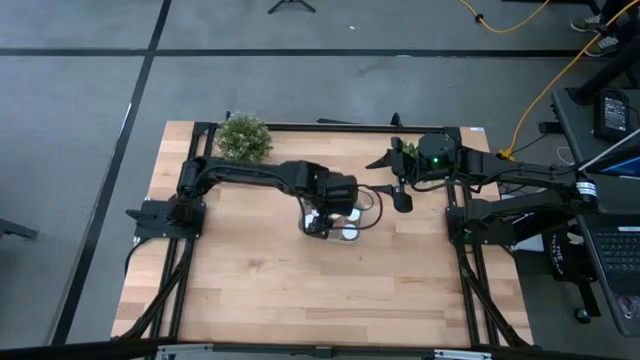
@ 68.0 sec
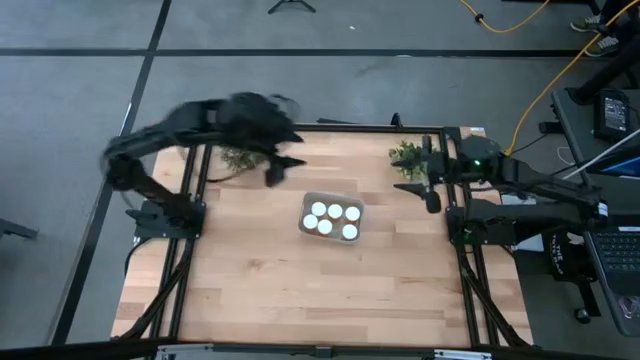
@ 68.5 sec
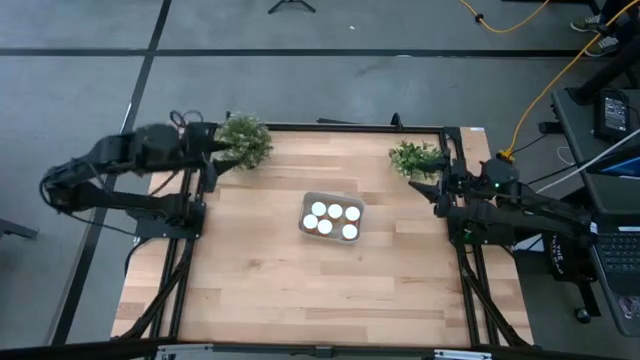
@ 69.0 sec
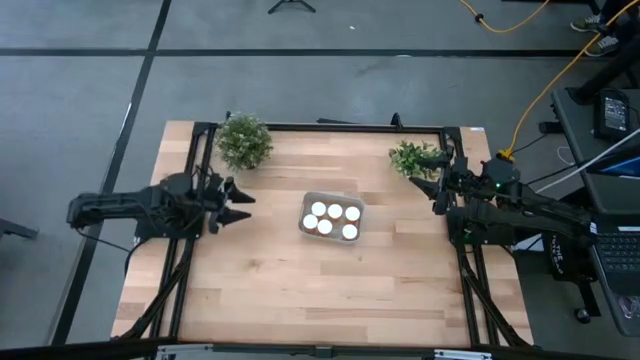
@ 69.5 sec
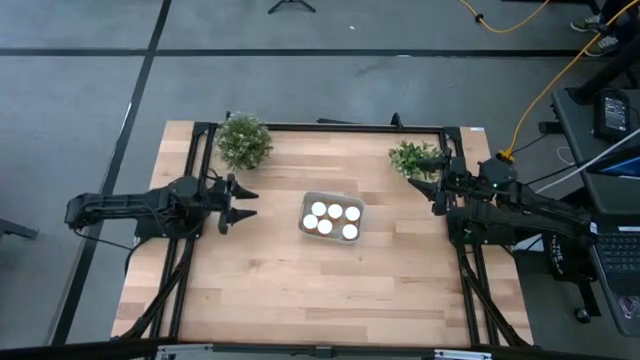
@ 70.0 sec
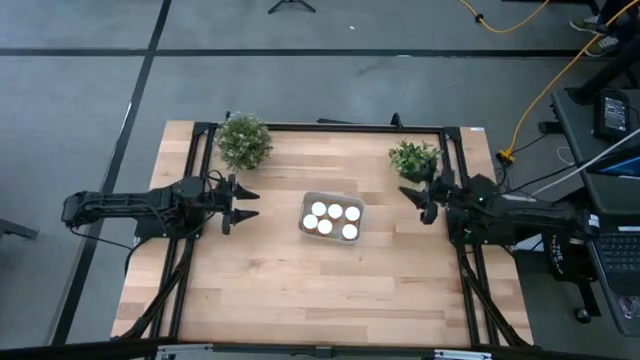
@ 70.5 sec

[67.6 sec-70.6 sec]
Task: Pick and place pill bottles into a basket
Return to Home Position

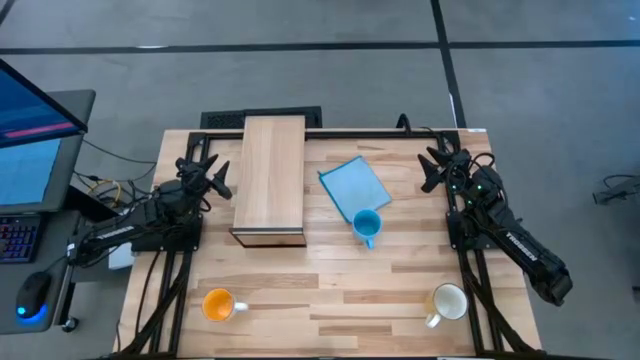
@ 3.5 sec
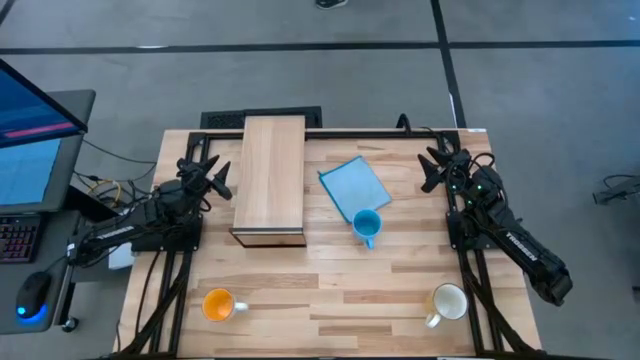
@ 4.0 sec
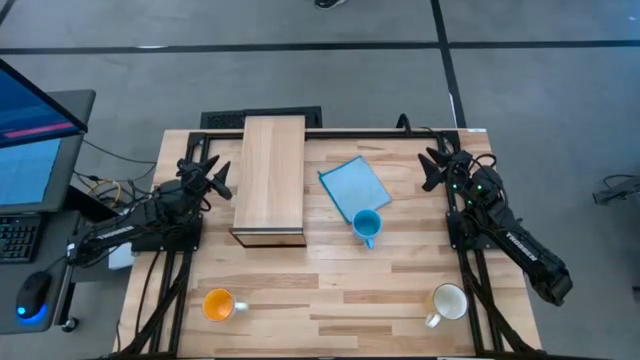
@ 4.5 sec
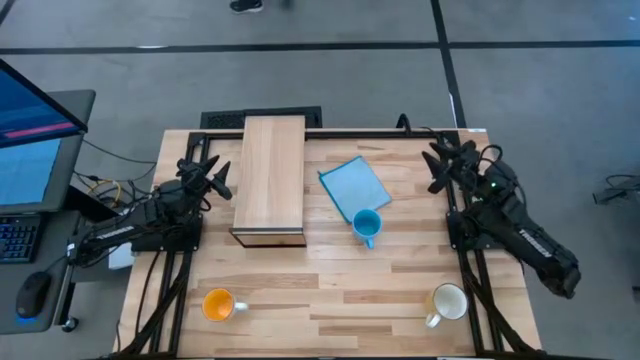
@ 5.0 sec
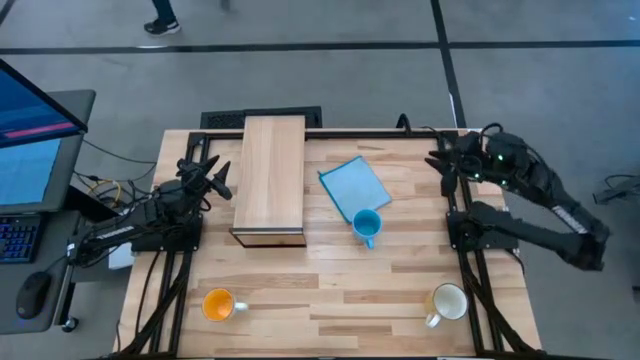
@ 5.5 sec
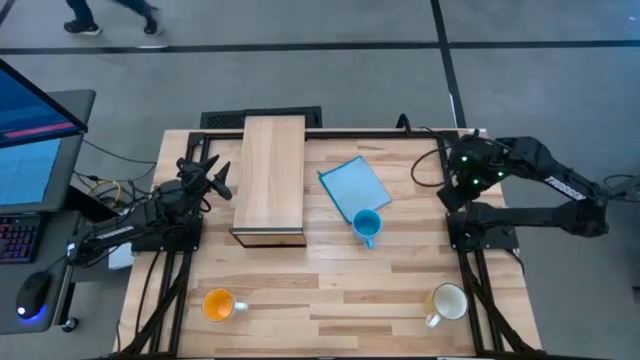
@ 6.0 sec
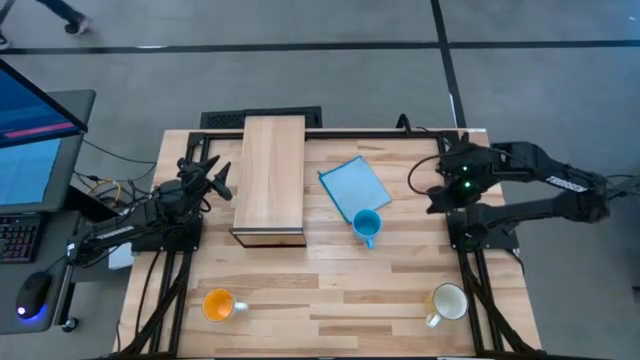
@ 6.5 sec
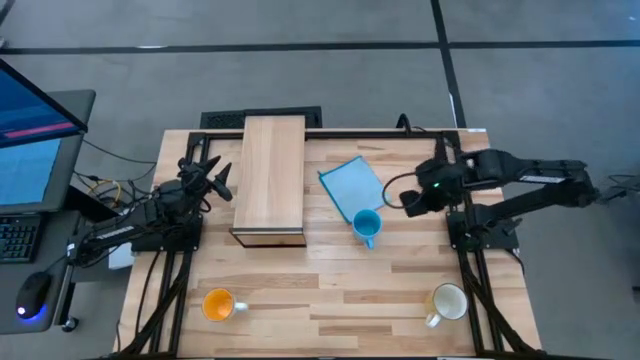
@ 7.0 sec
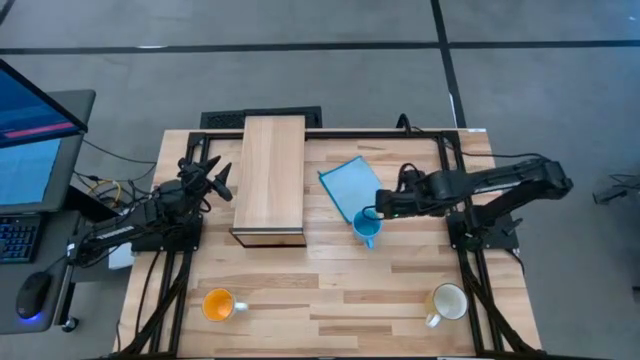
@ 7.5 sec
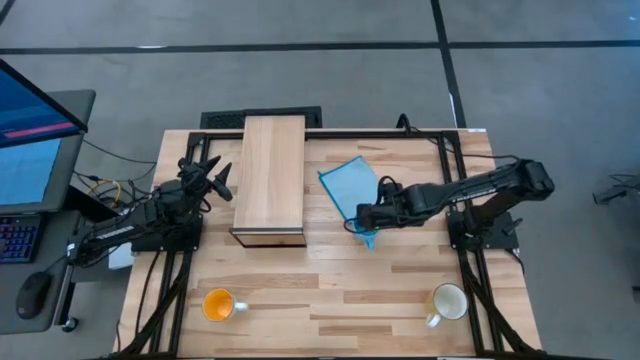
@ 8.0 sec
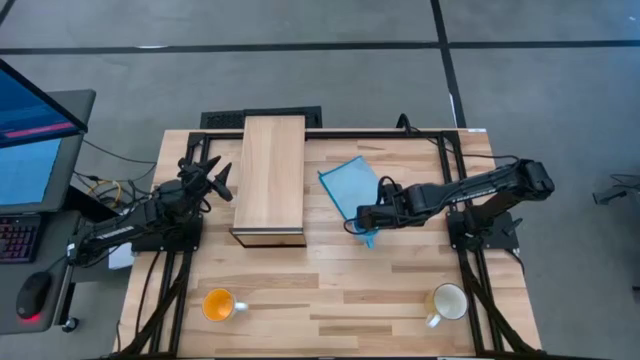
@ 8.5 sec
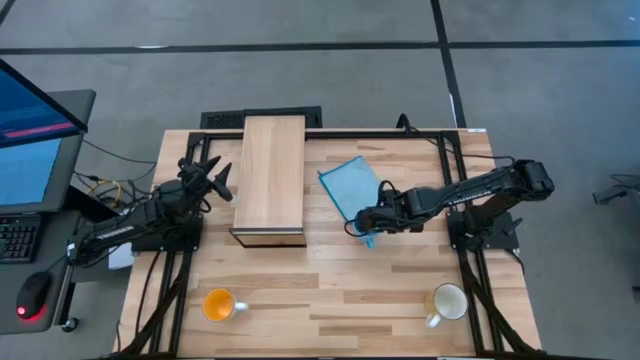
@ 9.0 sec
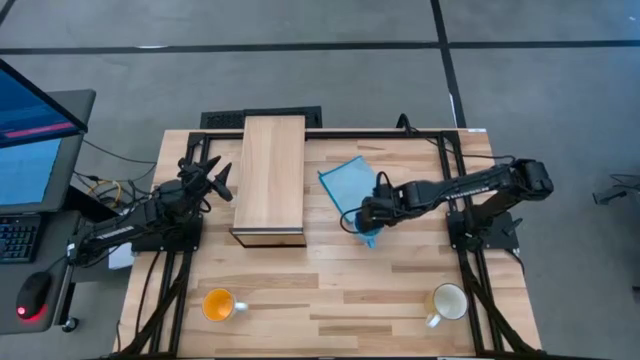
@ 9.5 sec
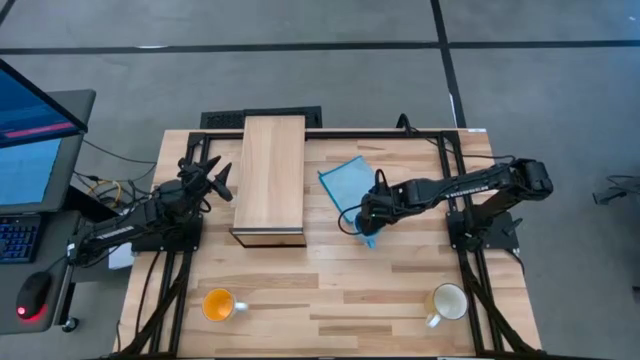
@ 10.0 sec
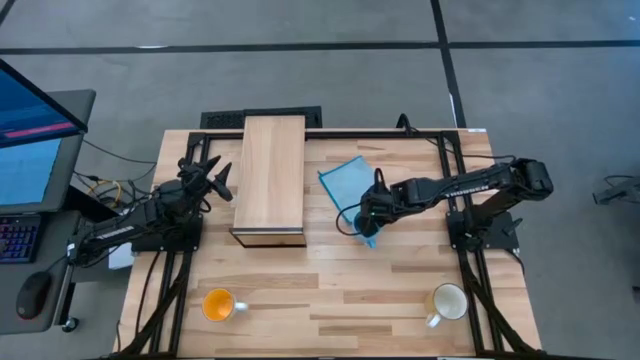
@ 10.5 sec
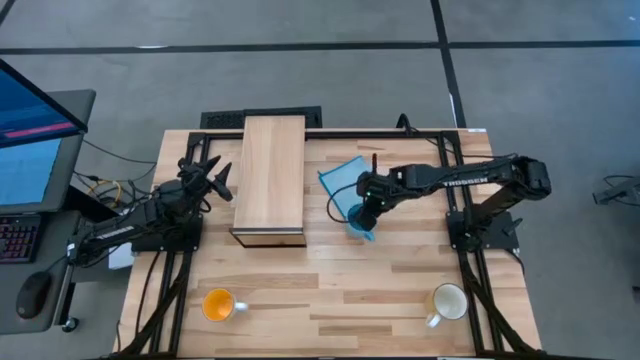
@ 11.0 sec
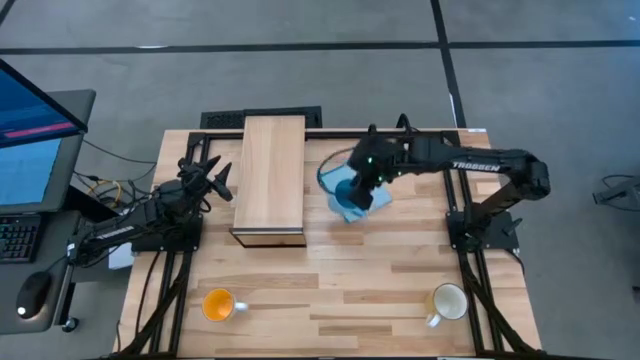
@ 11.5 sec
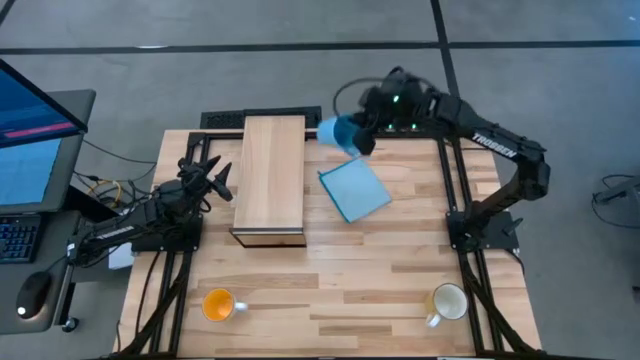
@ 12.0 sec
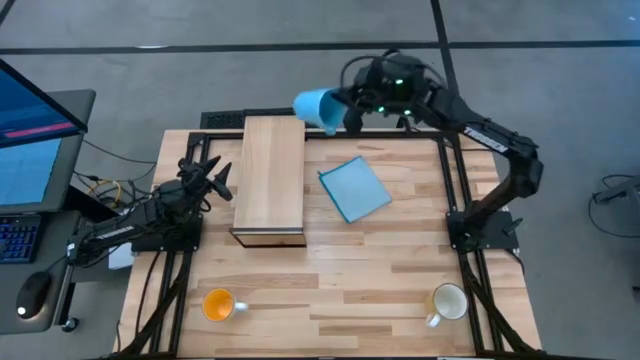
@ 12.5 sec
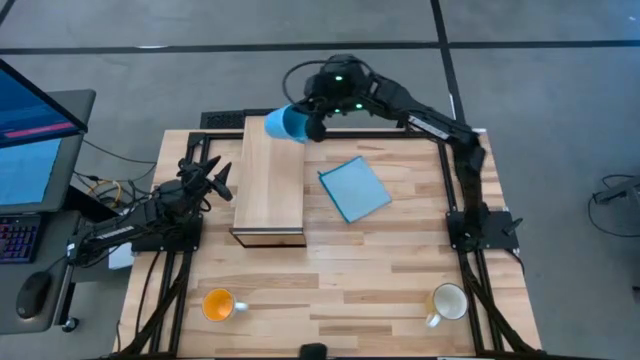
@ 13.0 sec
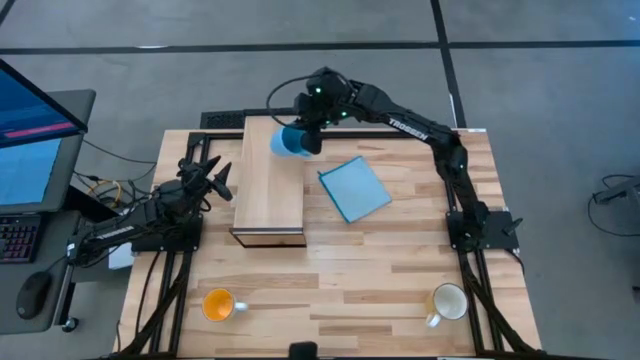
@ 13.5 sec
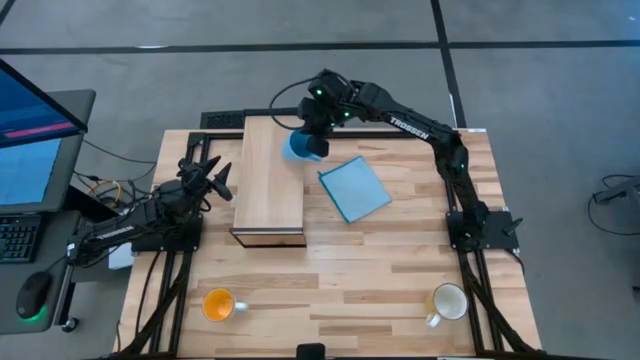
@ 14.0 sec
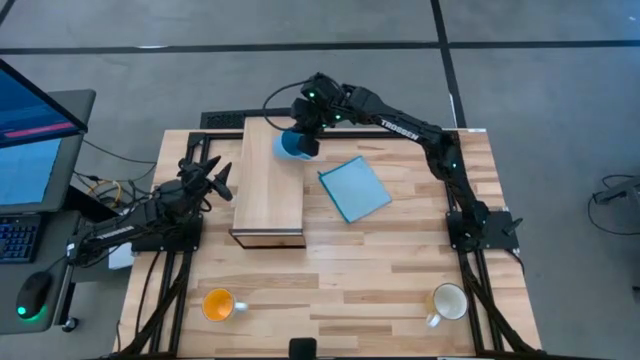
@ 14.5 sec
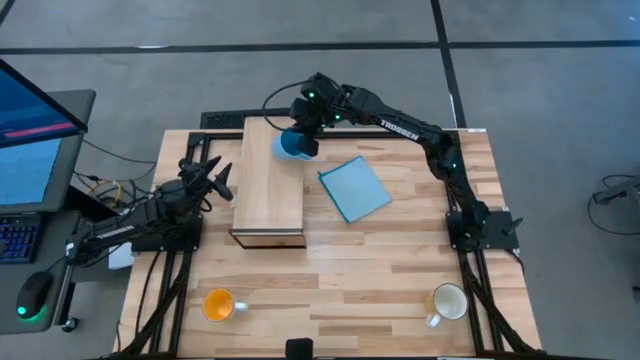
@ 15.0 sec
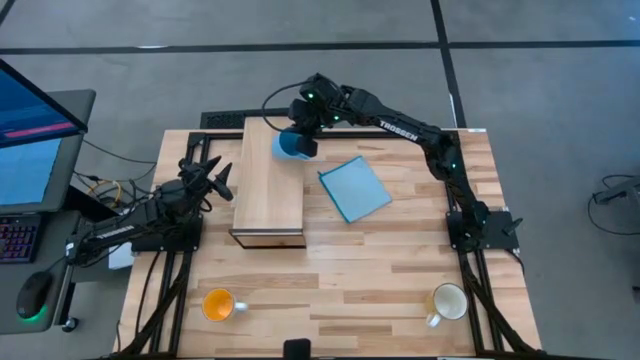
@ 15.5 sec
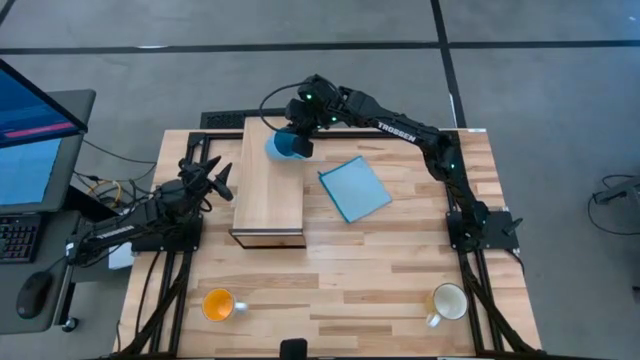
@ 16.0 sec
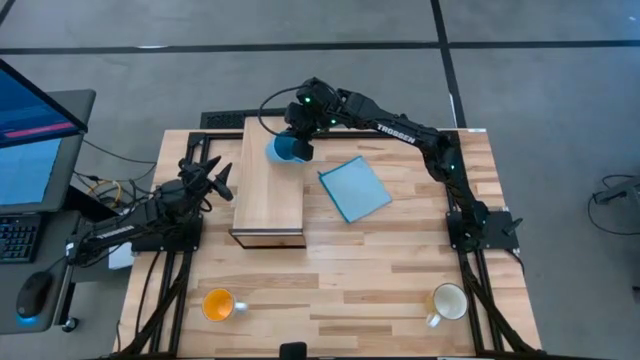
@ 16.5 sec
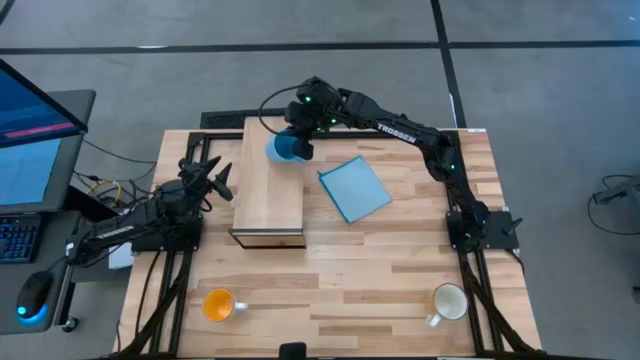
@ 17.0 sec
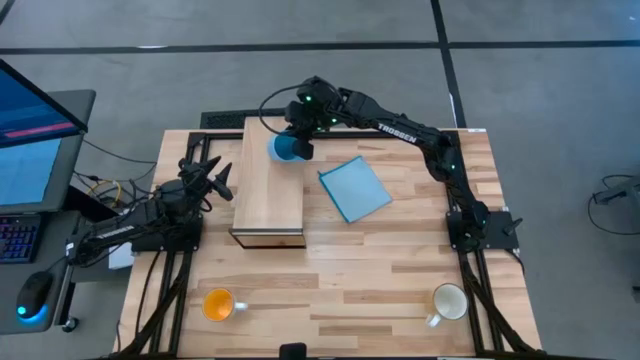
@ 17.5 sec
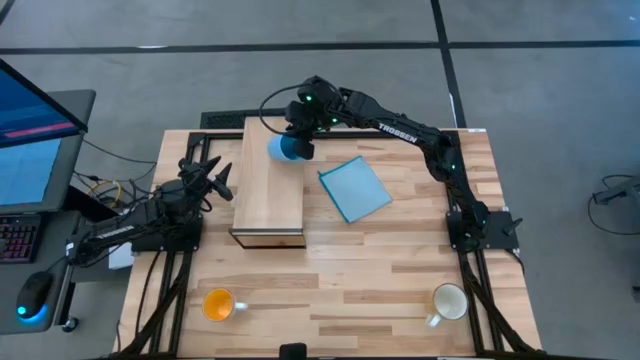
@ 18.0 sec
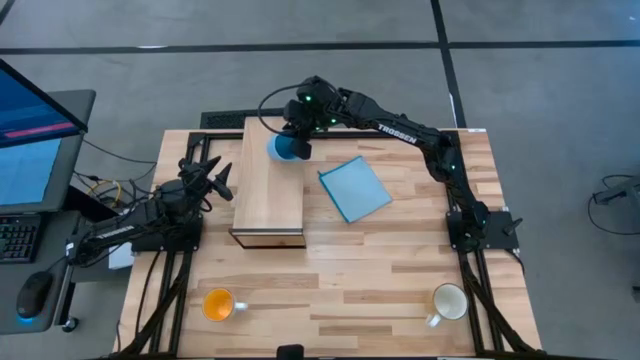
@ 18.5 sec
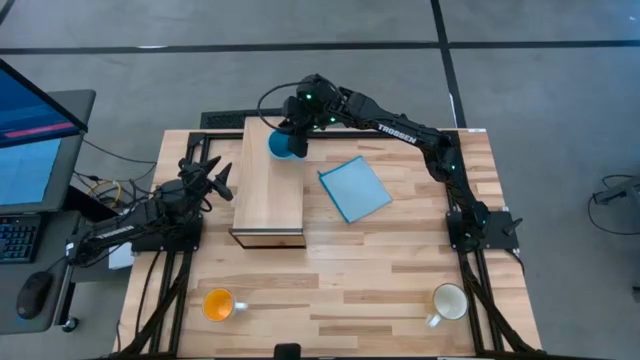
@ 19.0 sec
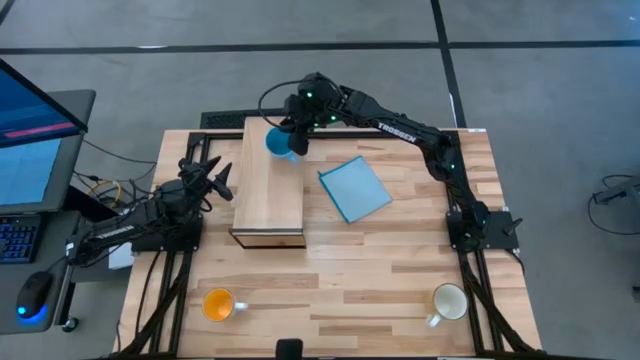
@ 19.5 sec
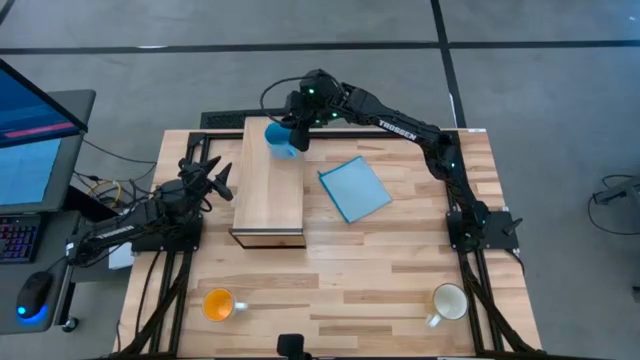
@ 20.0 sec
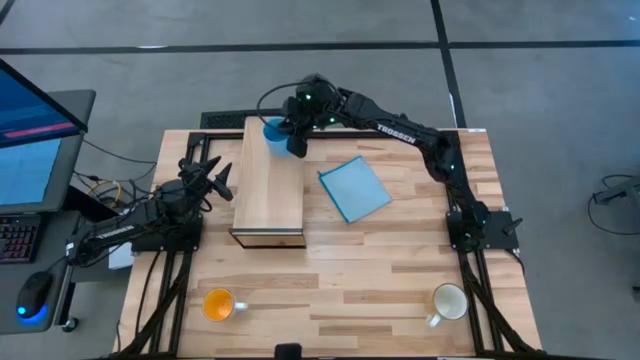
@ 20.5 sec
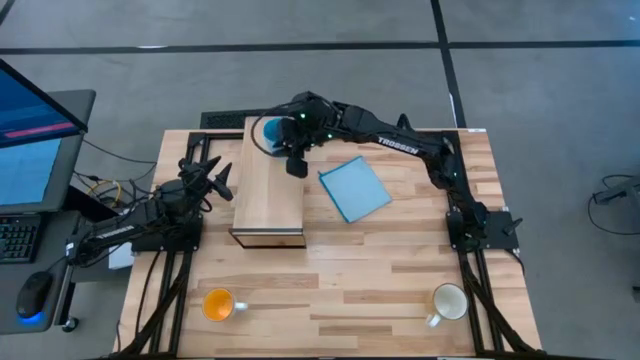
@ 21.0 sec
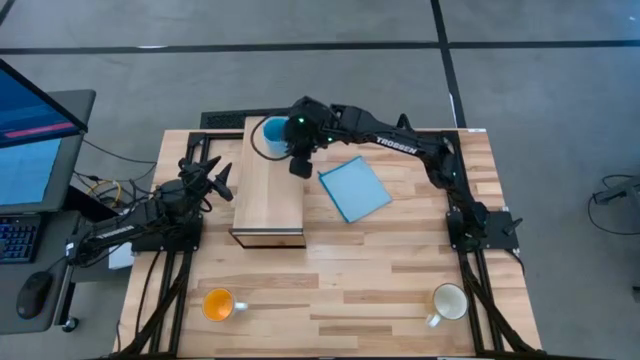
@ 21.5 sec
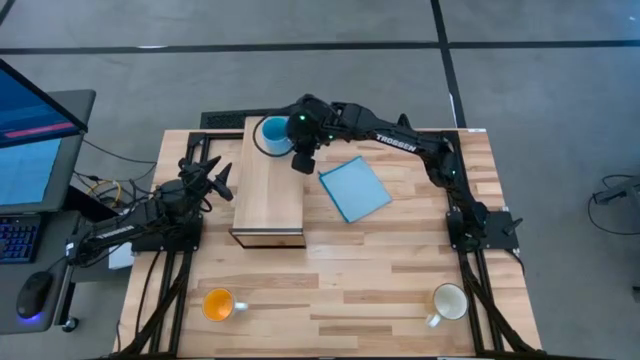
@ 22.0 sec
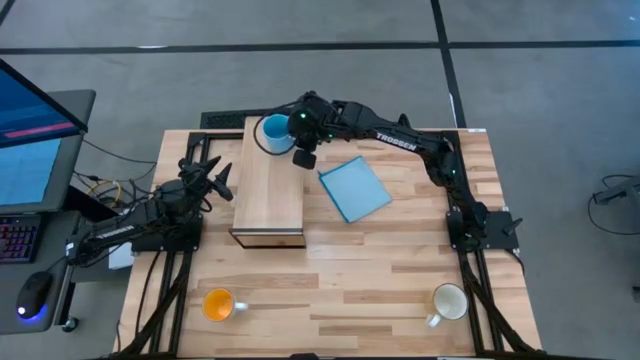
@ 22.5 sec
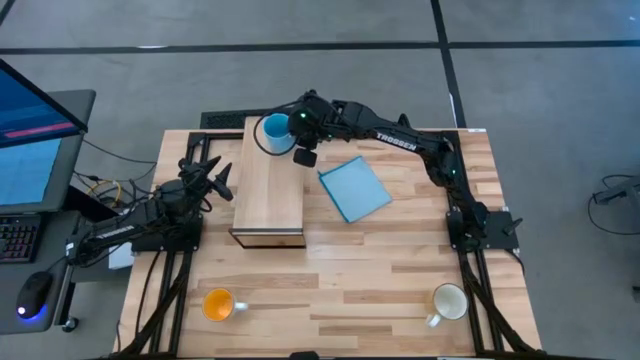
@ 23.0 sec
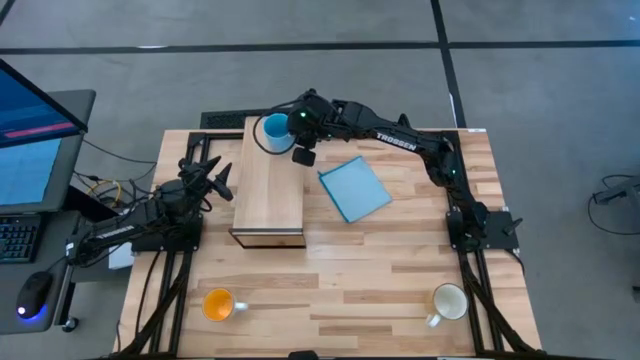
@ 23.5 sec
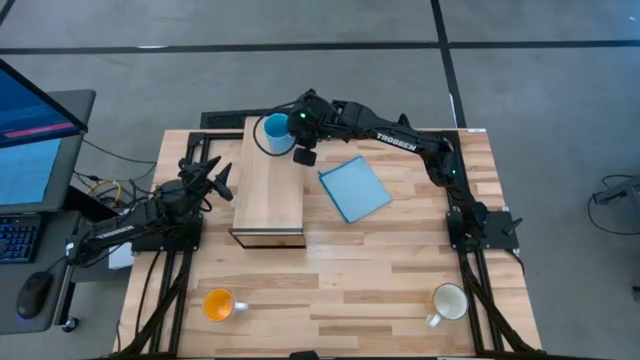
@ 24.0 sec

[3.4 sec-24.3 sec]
Task: Stack small to large cups/mugs on shelf
Put the blue mug on the shelf
